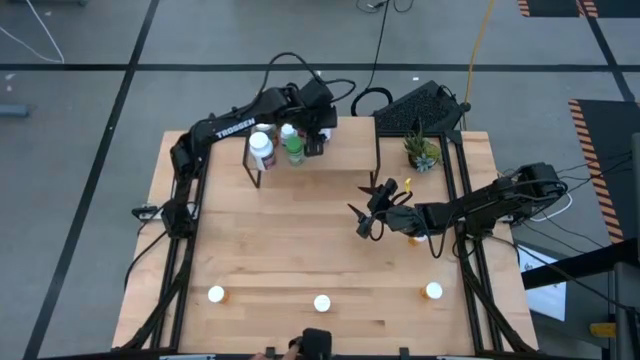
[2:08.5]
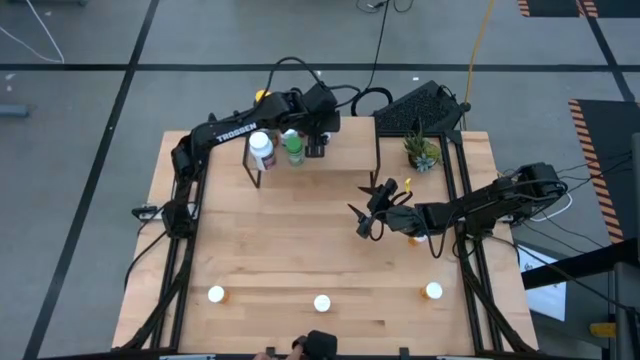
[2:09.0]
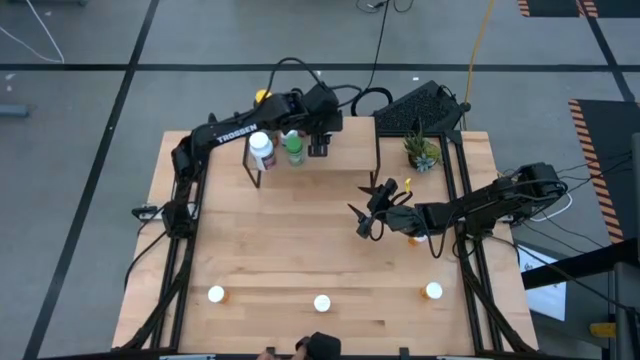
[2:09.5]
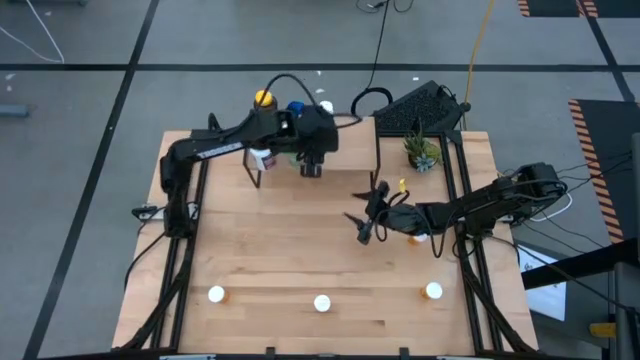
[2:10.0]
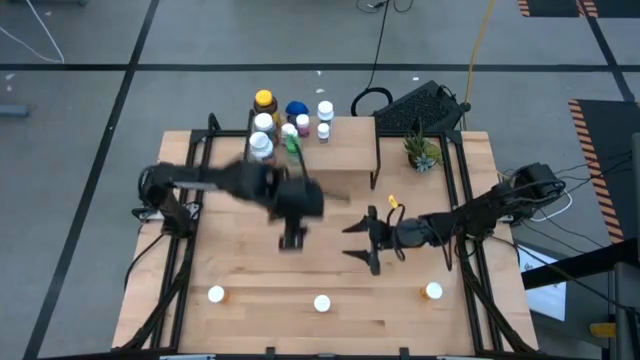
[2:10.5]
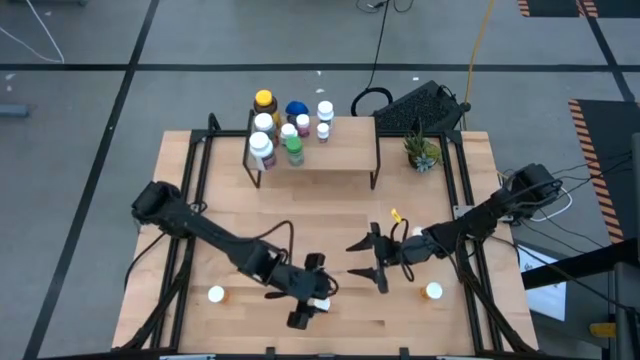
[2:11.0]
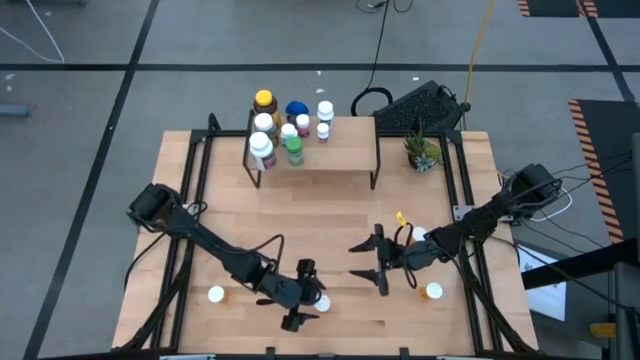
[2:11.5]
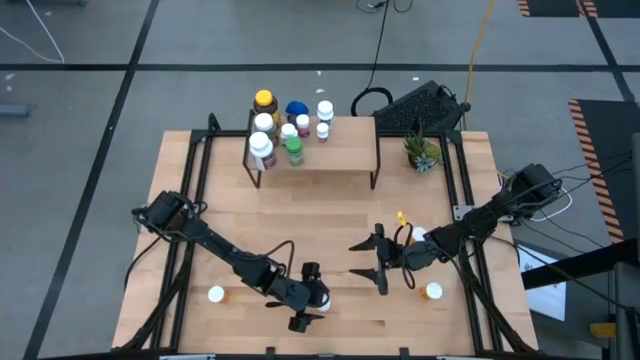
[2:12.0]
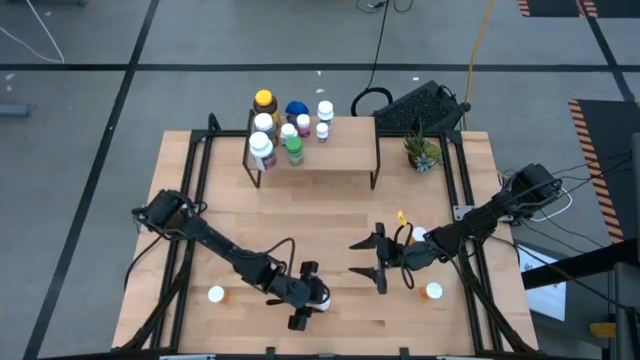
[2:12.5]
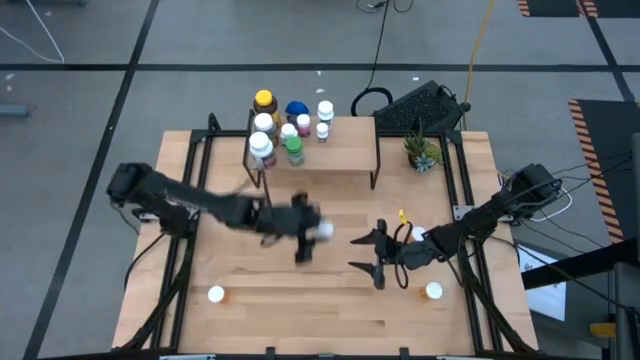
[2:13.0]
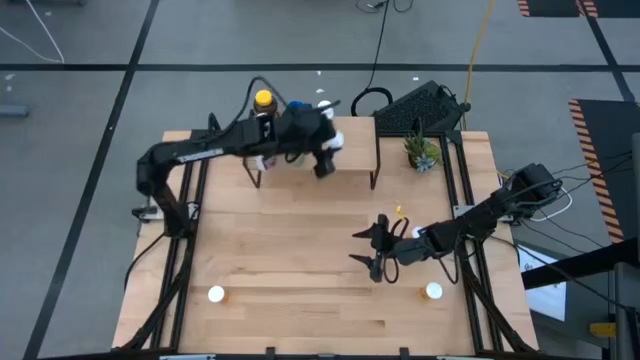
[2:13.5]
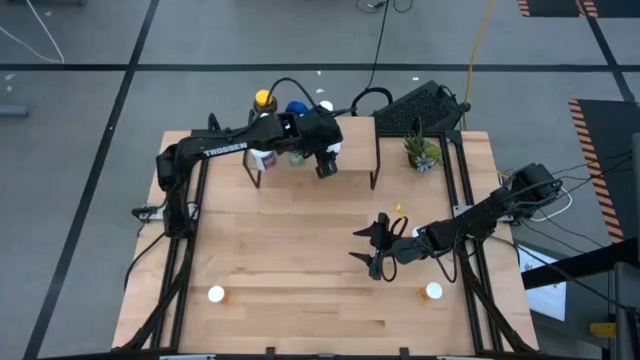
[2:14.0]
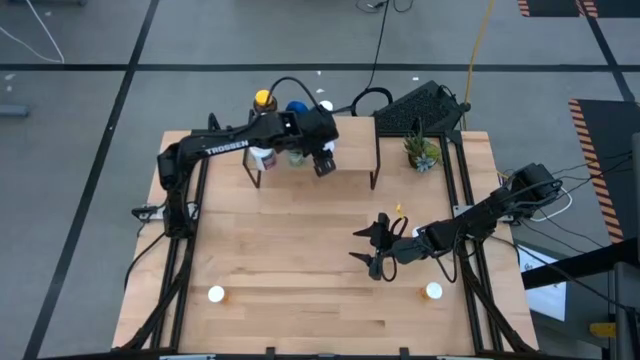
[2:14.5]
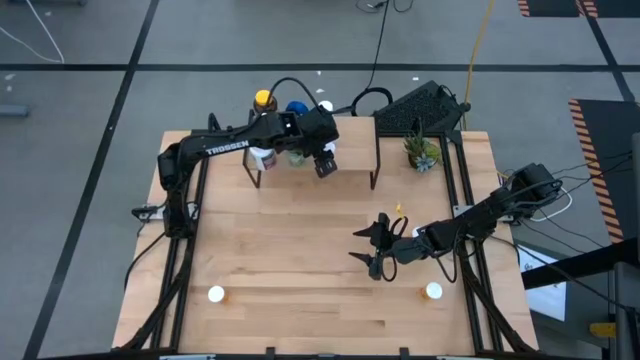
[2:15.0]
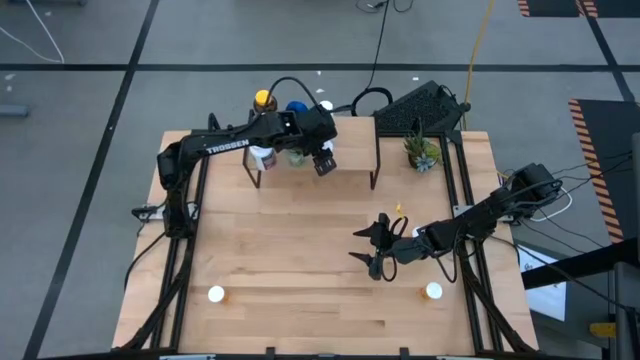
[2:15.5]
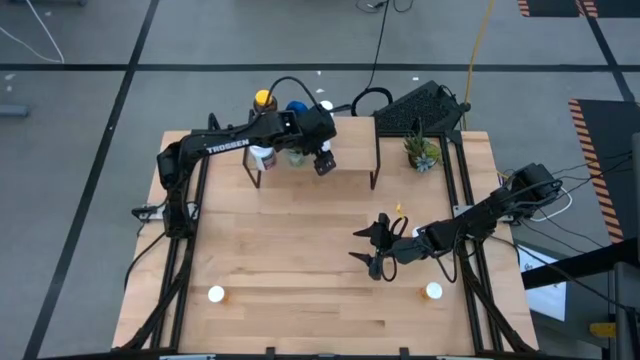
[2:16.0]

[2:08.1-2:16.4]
Task: Pick and place medicine bottles onto shelf by color
Put the bottom middle orange pill bottle on the shelf, aligned with the other white small medicine bottles

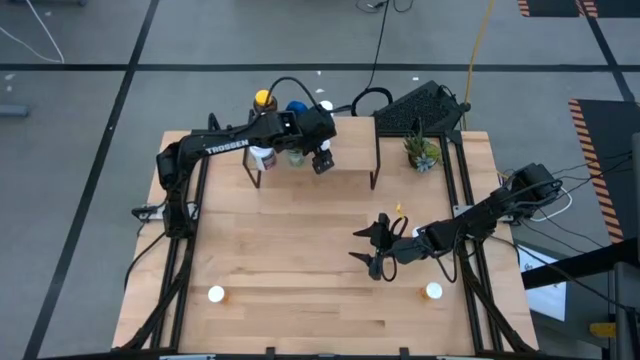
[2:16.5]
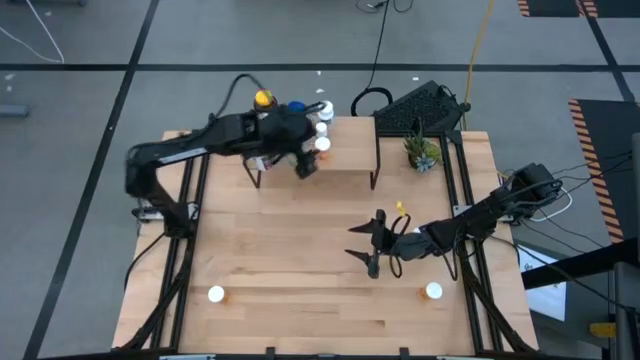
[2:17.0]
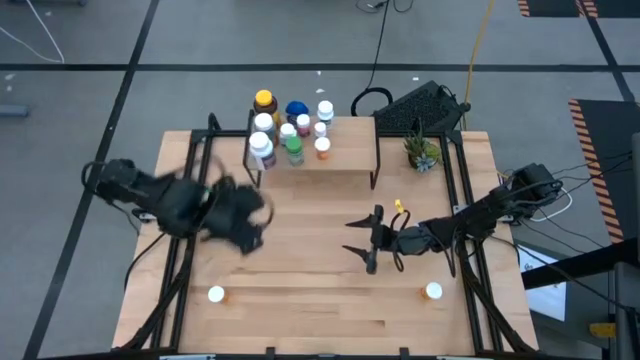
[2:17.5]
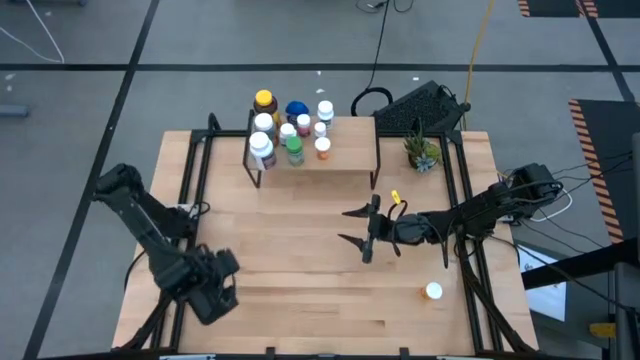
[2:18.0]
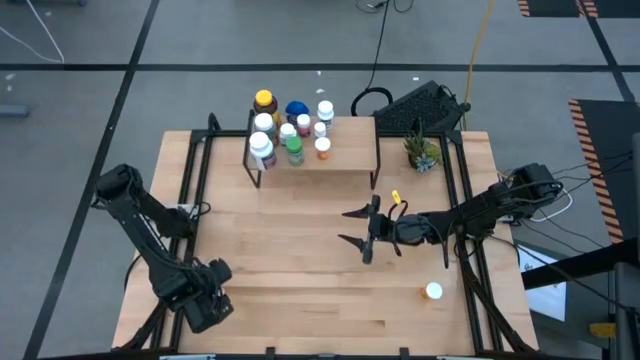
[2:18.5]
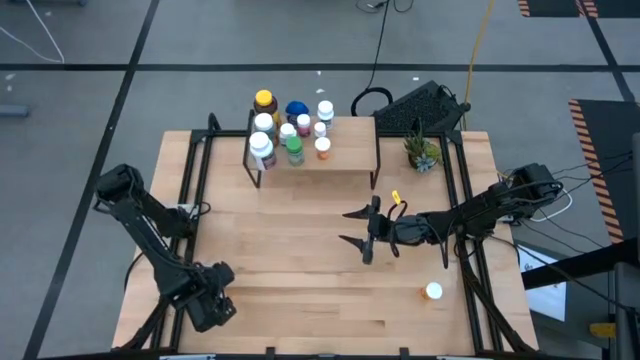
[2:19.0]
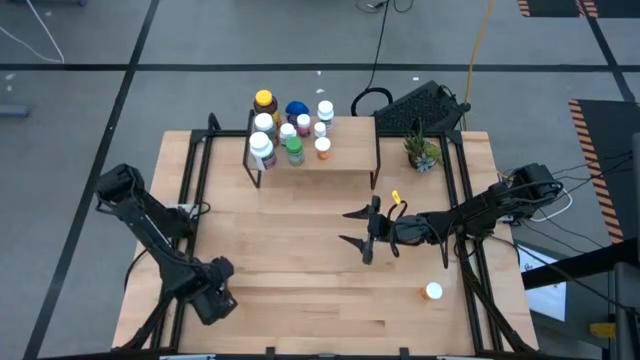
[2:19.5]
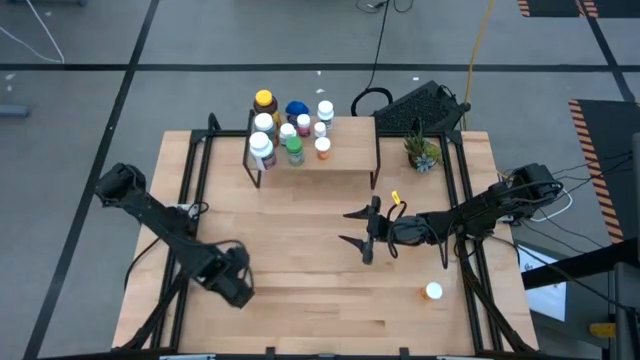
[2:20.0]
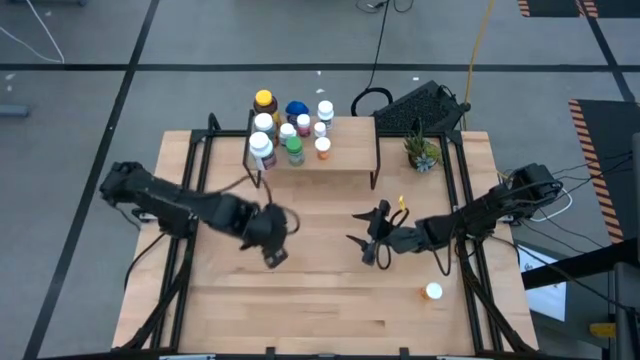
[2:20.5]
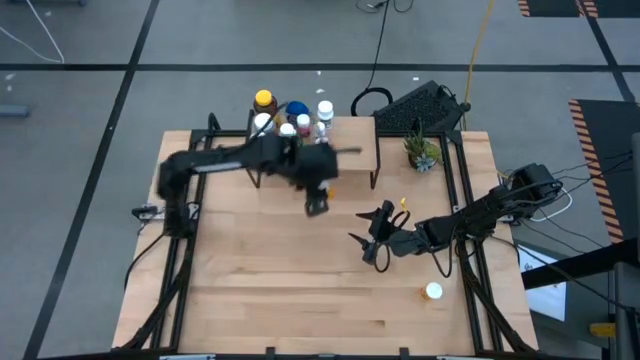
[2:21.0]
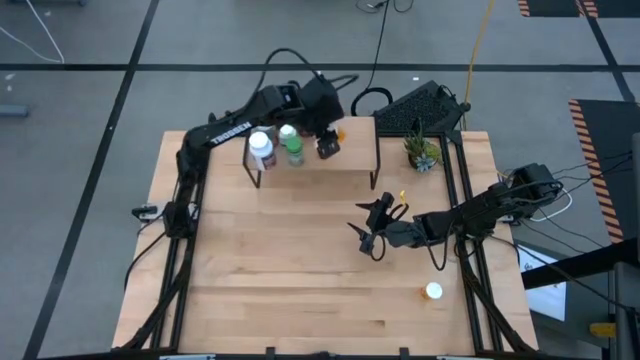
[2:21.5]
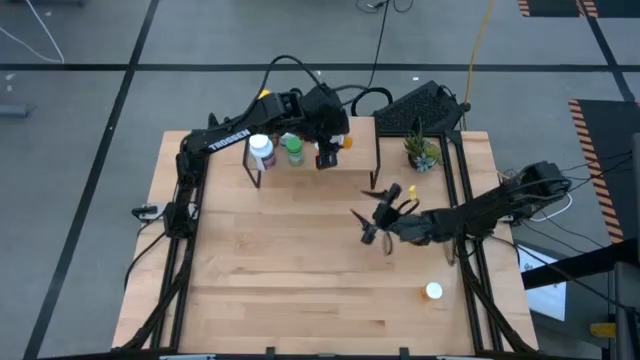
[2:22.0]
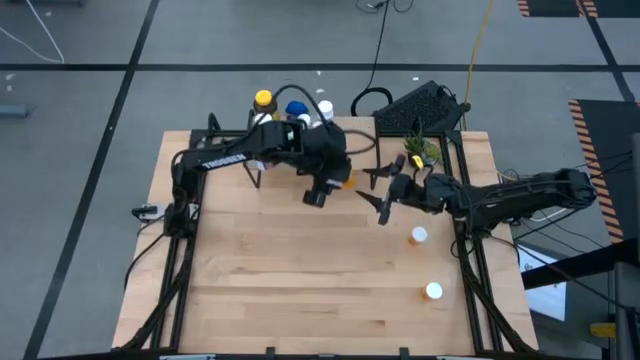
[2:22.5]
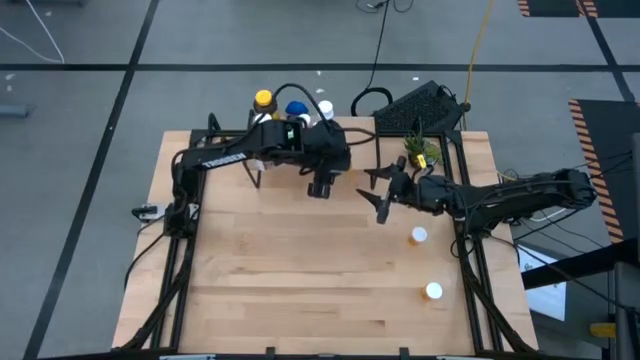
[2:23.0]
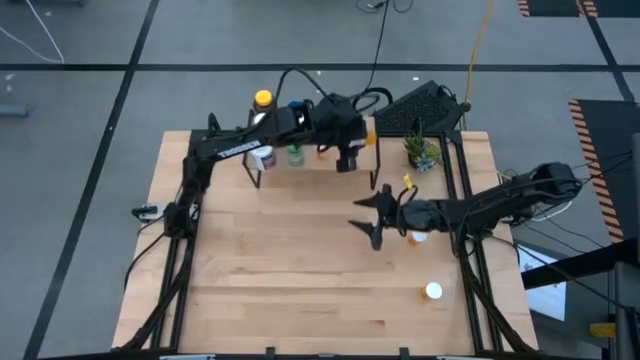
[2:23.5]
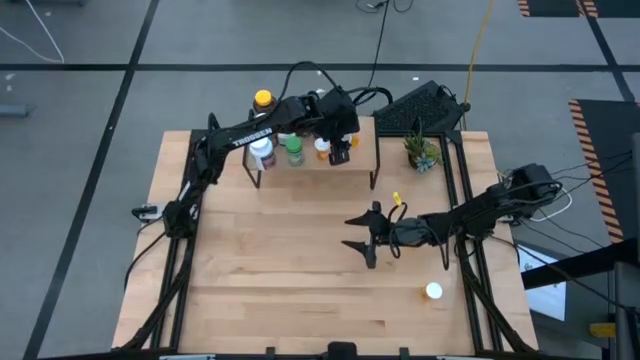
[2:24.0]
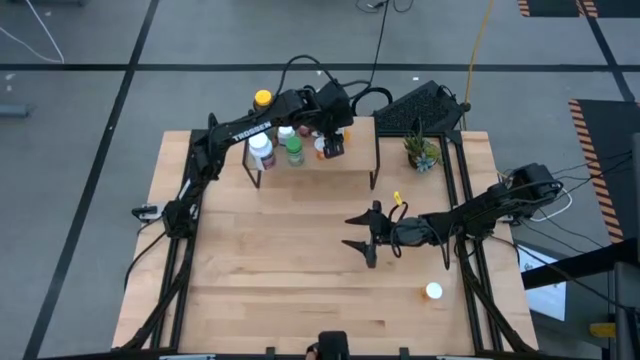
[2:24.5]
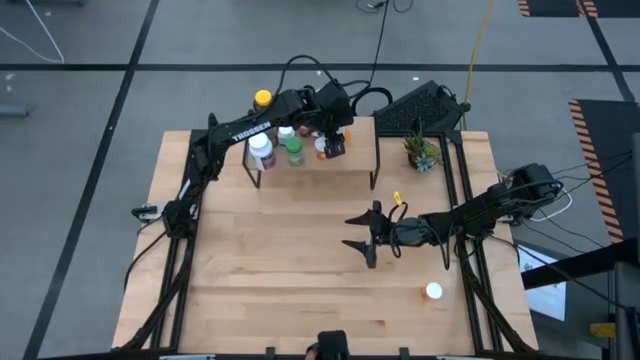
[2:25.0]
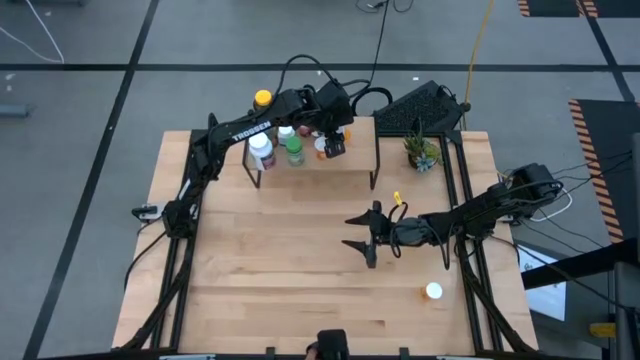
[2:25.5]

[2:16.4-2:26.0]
Put the bottom left orange pill bottle on the shelf

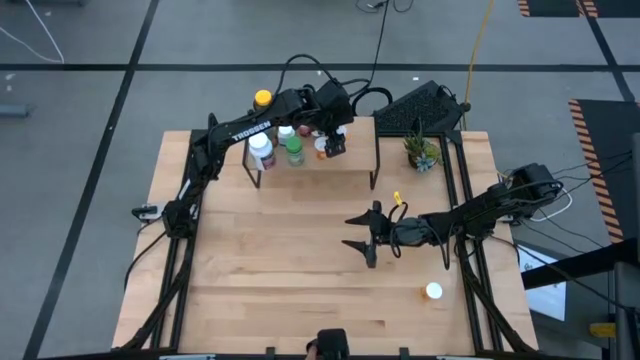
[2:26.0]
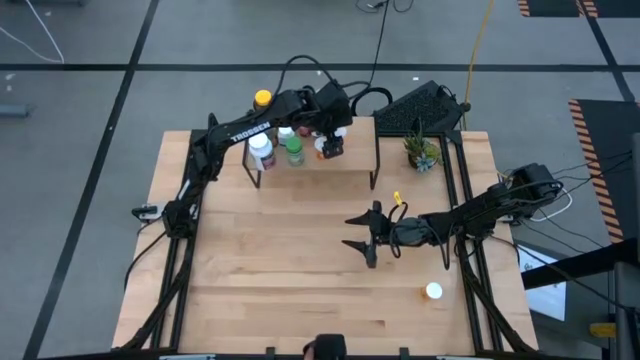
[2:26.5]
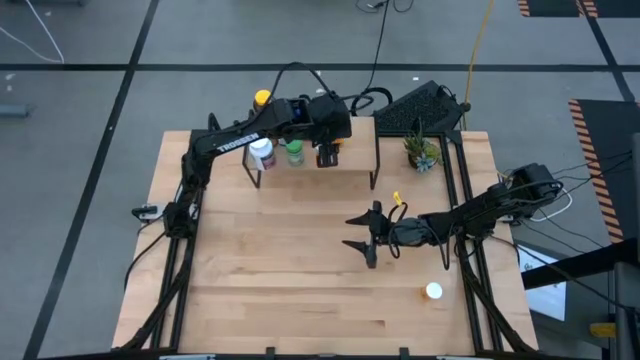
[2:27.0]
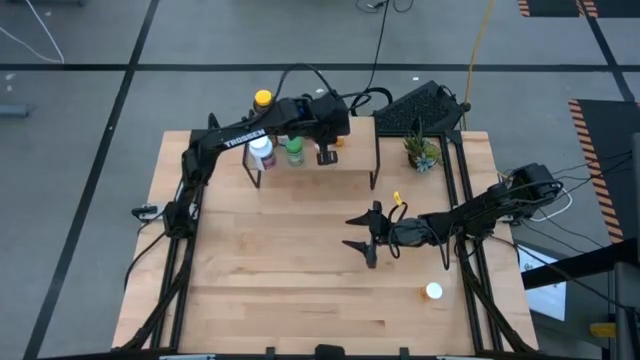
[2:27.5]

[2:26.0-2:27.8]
Adjust the orange pill bottle on the shelf
